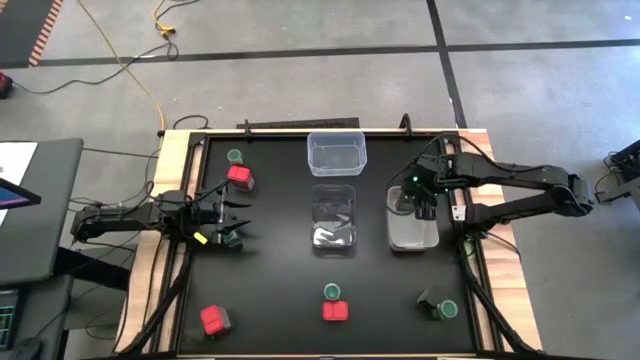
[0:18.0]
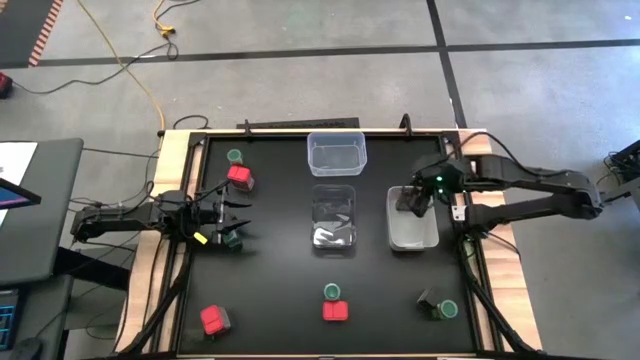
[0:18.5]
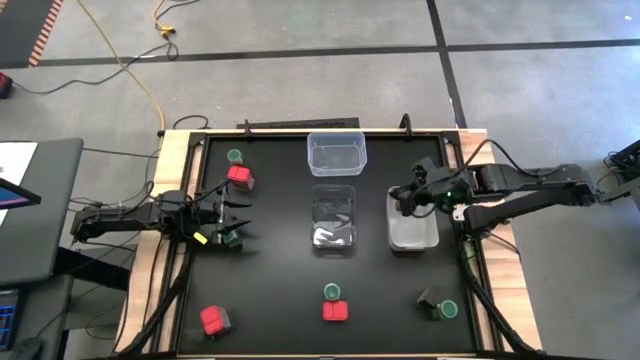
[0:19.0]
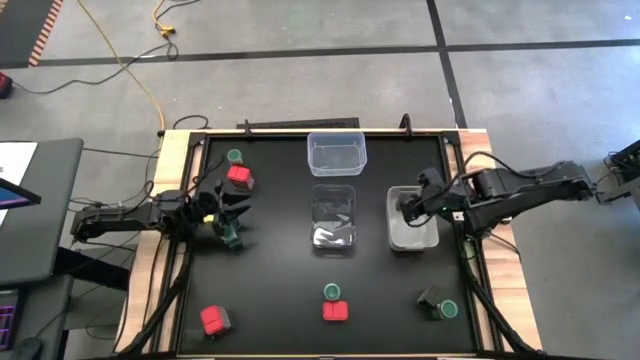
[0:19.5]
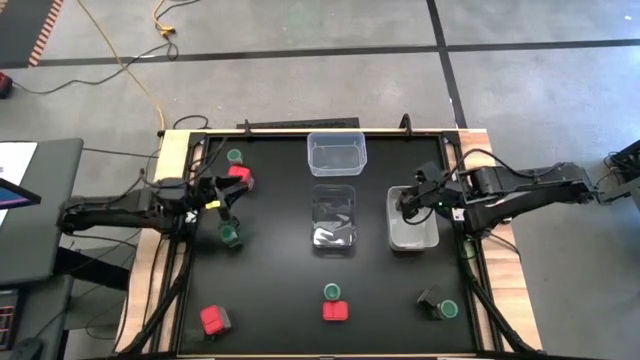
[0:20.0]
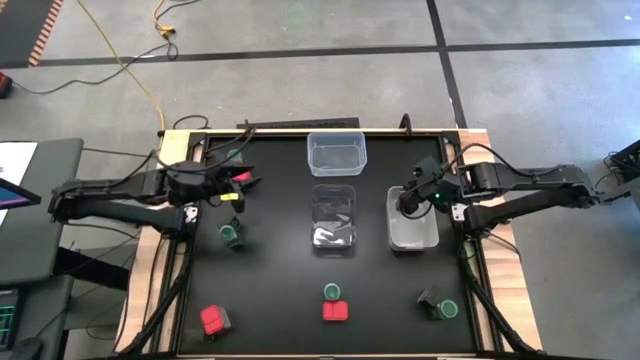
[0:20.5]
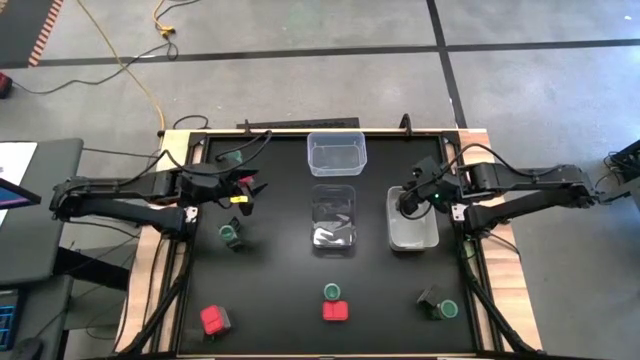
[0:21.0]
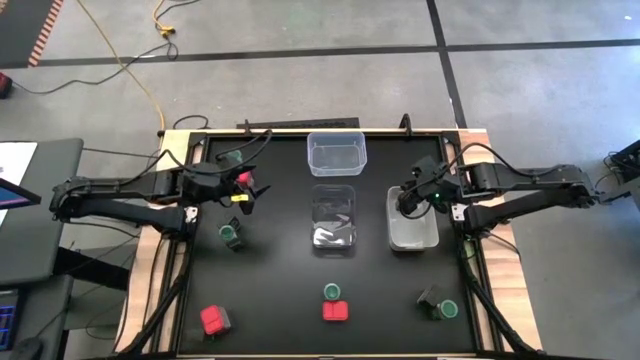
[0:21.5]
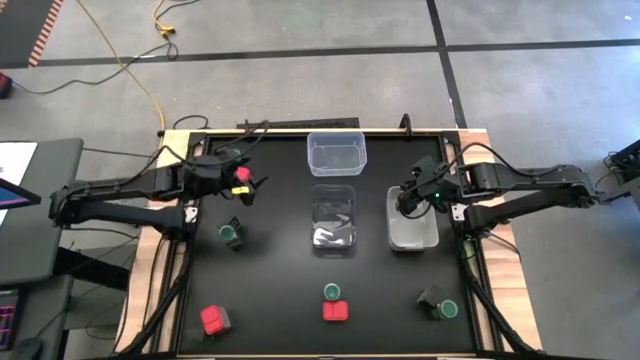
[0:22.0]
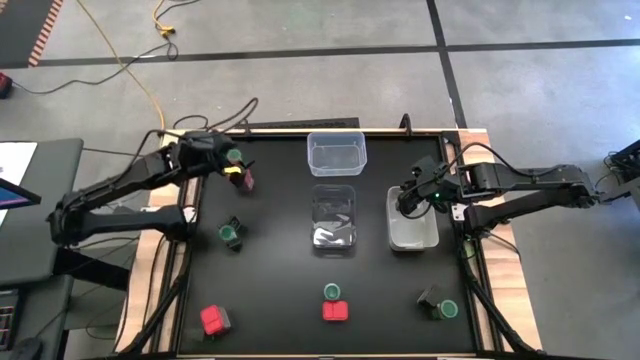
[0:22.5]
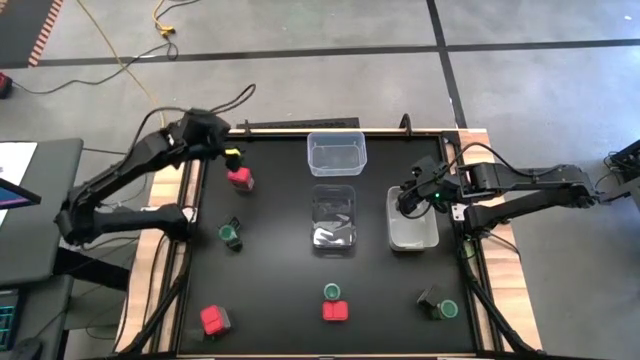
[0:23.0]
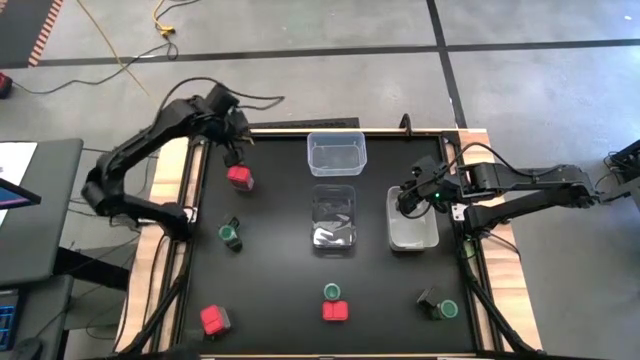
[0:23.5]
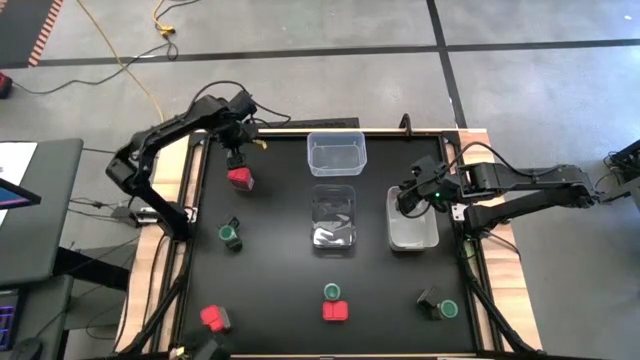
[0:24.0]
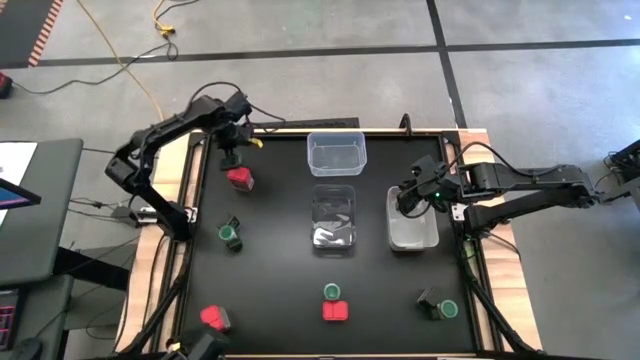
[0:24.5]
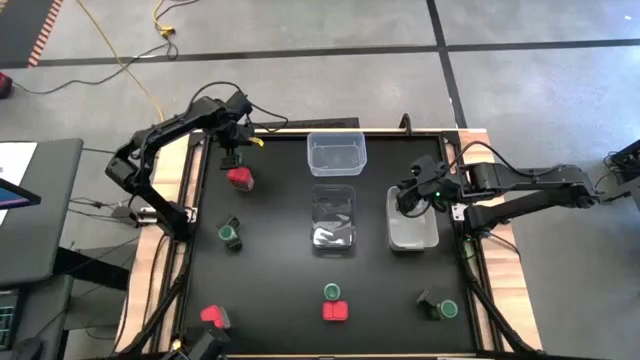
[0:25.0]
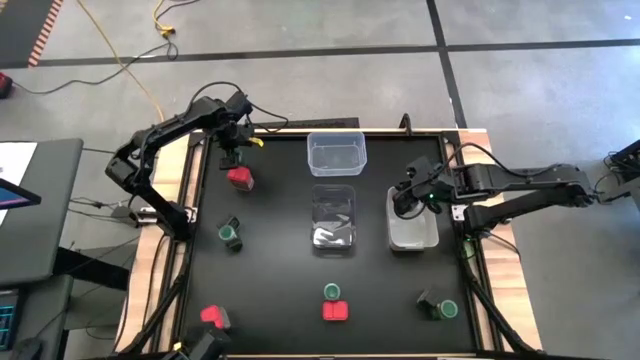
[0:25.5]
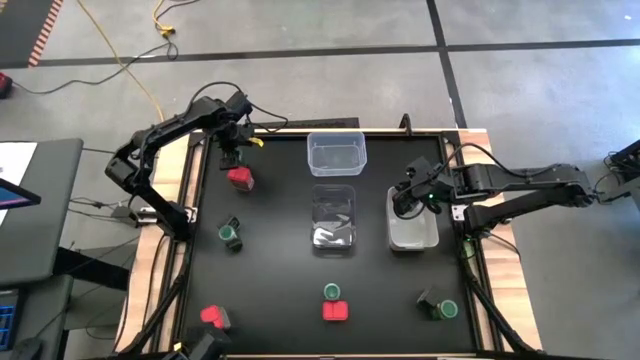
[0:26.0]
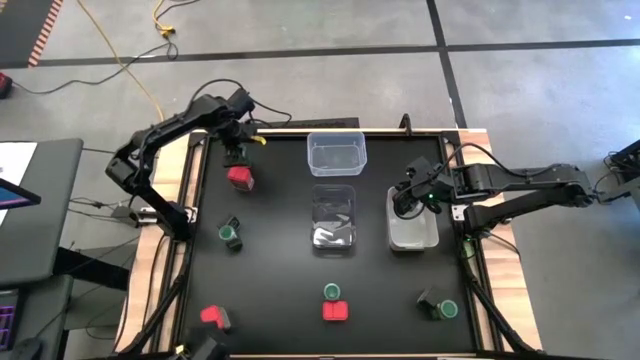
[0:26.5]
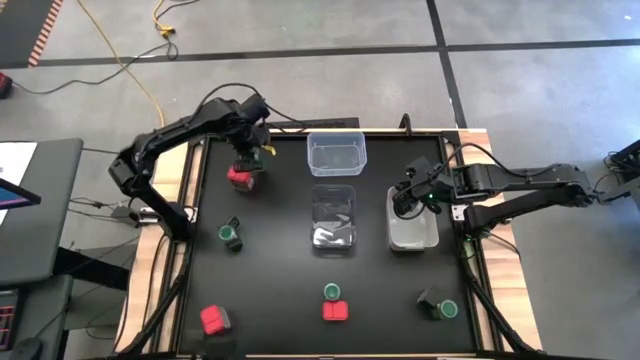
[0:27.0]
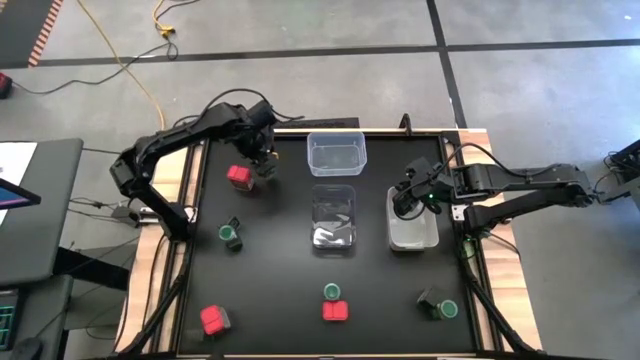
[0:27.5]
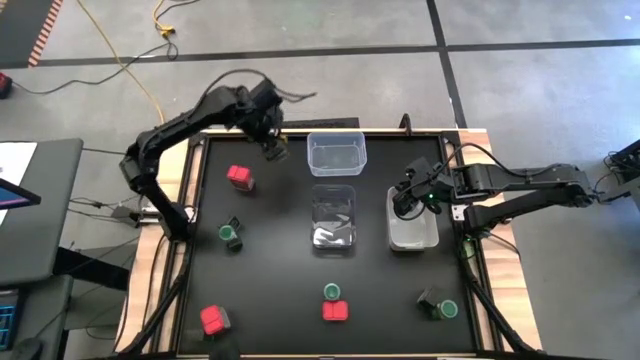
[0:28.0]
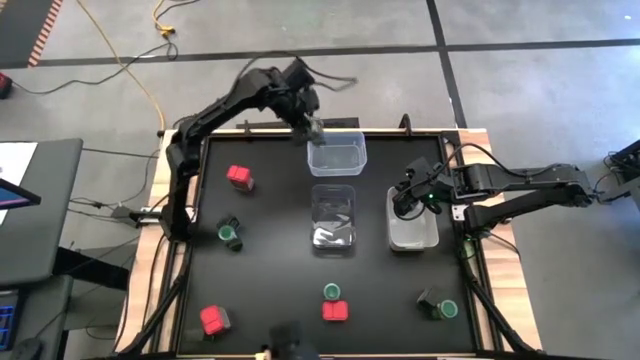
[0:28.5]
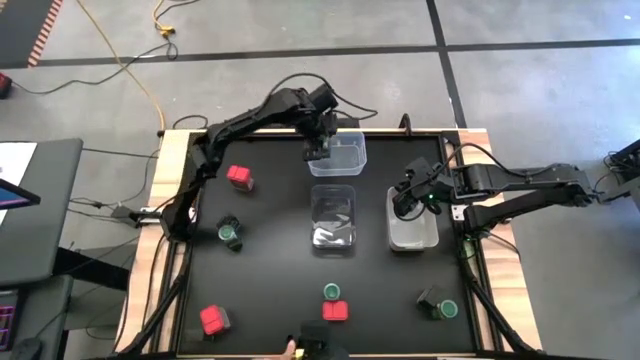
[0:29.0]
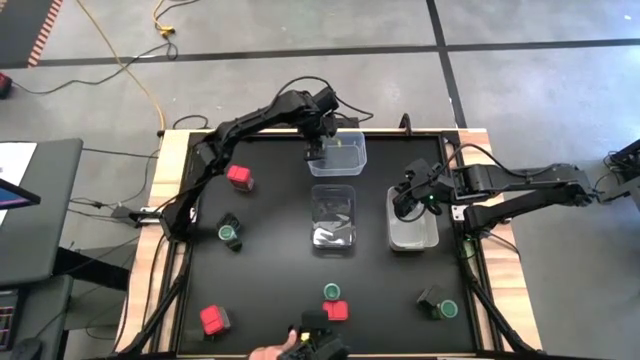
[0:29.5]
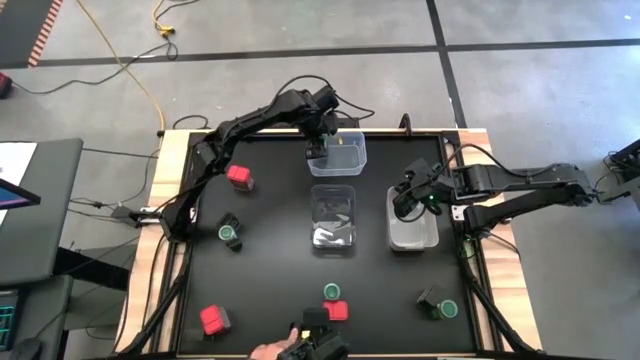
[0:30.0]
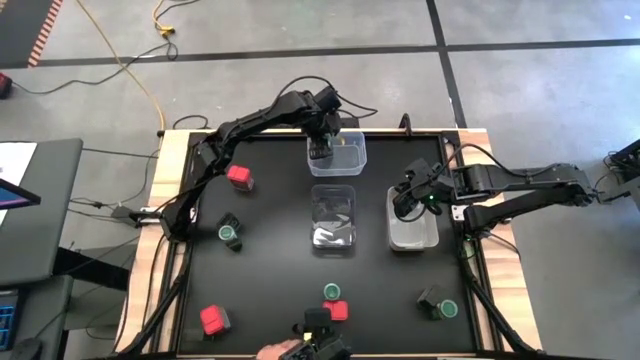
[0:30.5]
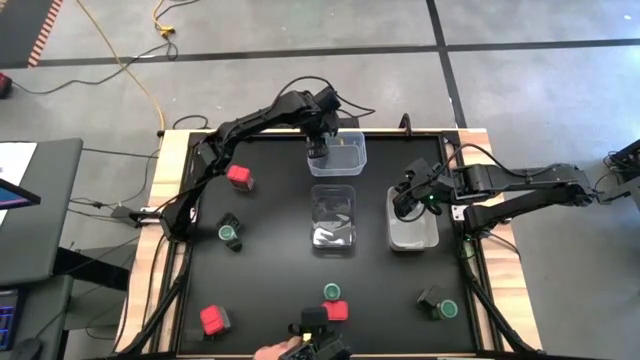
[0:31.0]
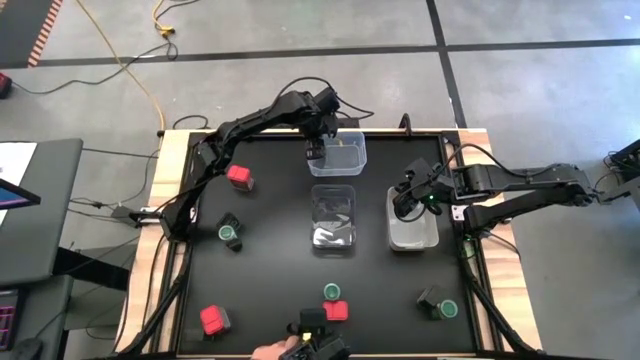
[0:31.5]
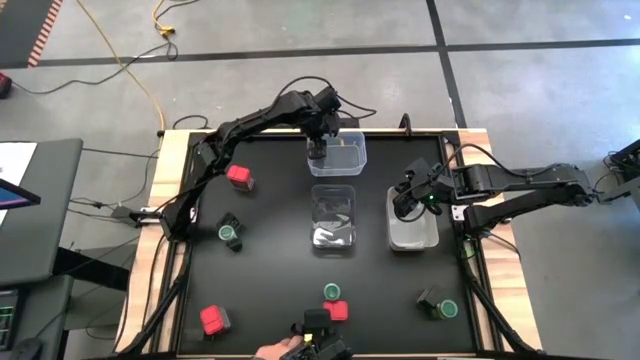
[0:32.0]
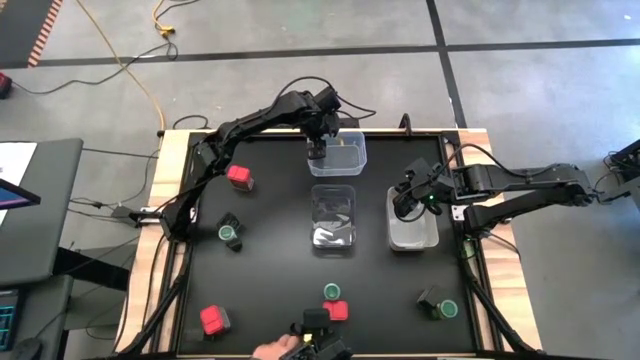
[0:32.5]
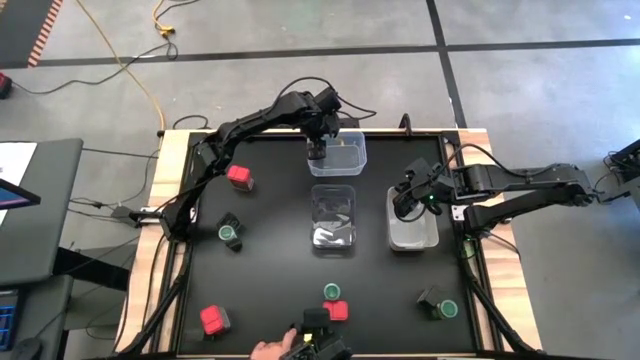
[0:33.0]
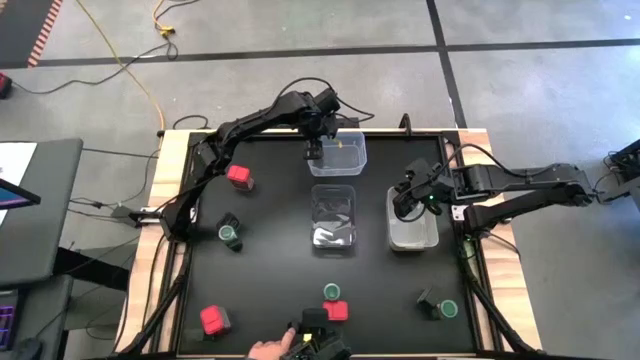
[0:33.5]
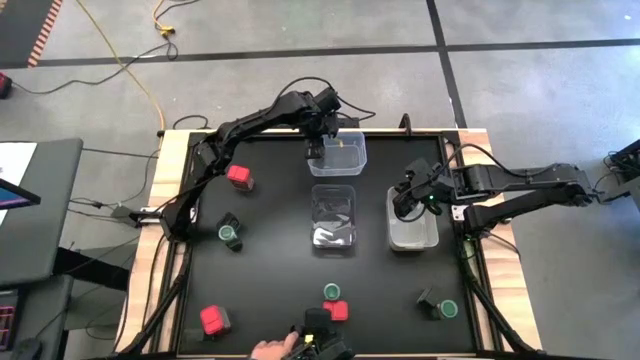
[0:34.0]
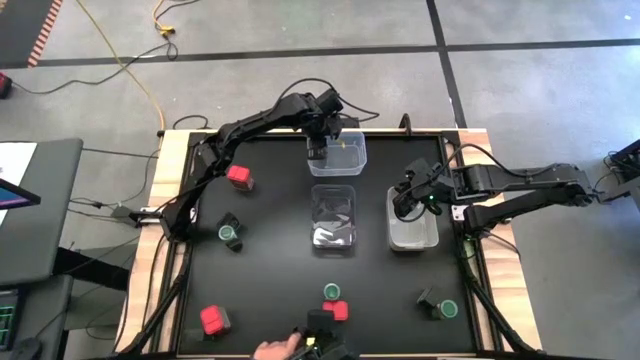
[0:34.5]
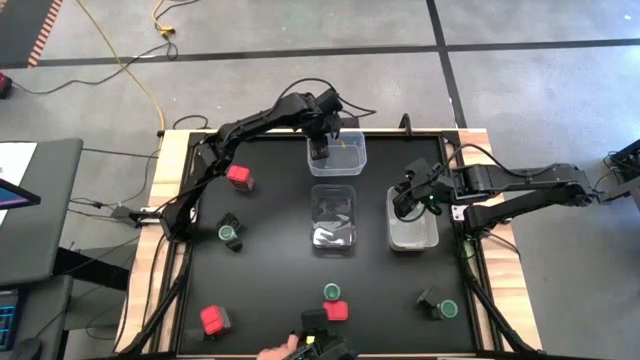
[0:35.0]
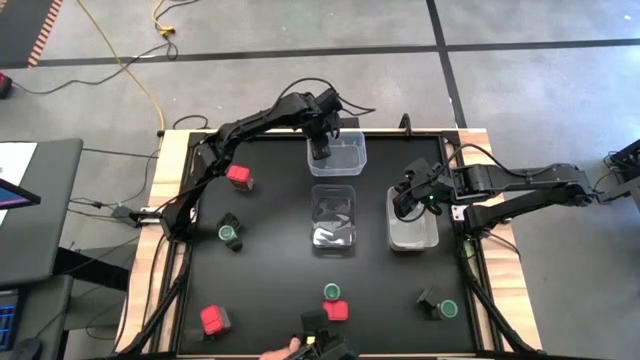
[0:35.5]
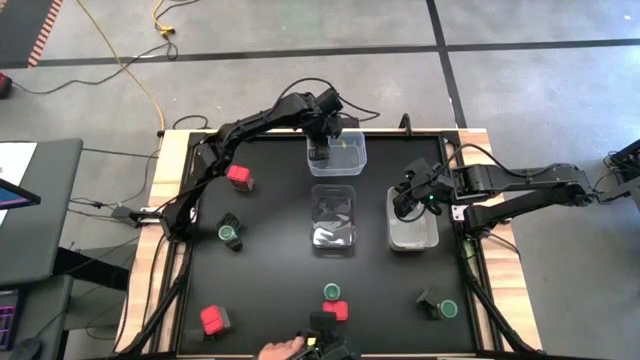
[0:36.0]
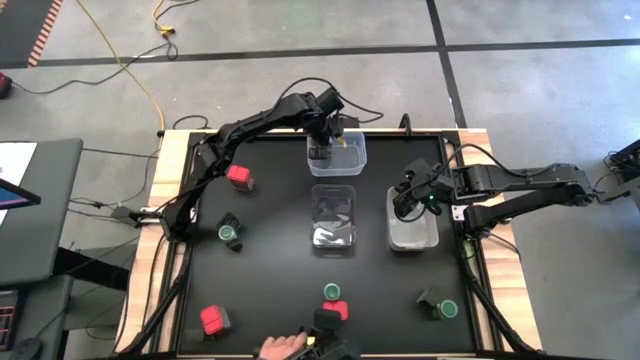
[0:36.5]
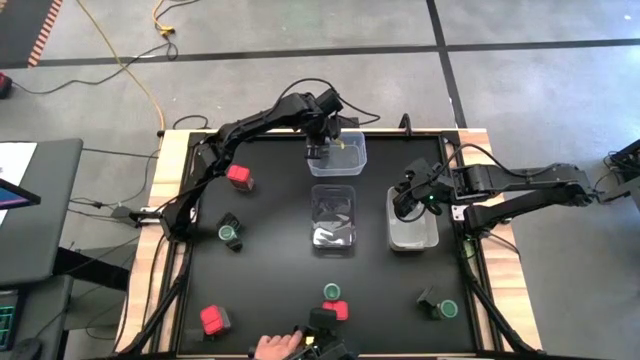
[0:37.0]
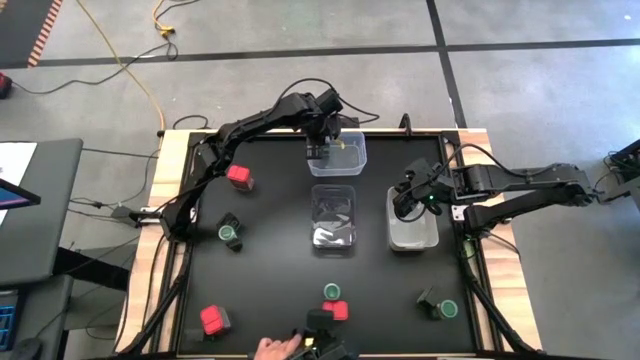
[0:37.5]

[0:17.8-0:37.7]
Task: Sort spices by type
Put the green seasoning bottle into the transparent bin
